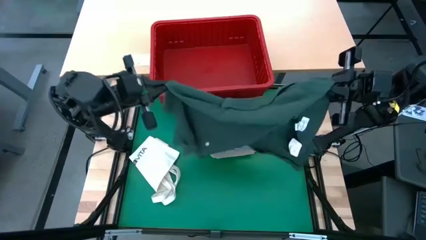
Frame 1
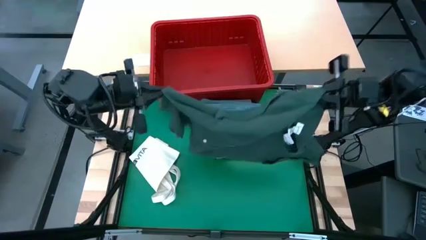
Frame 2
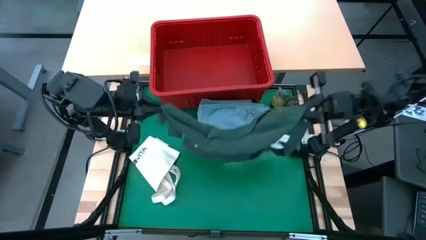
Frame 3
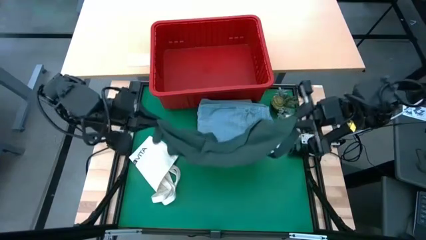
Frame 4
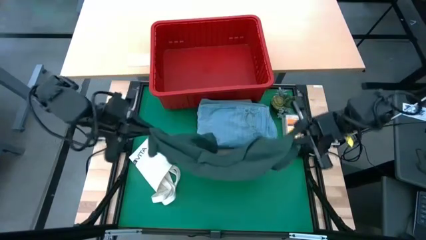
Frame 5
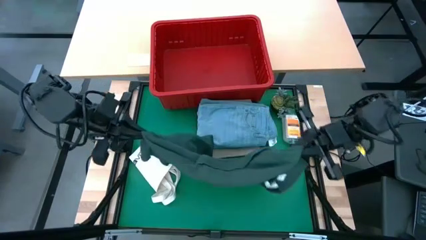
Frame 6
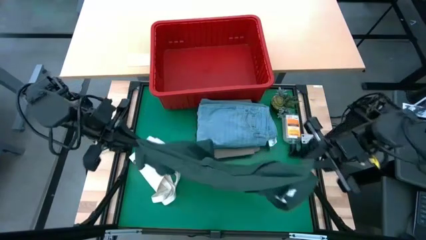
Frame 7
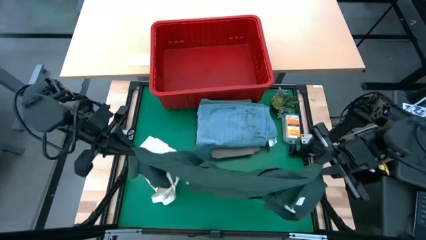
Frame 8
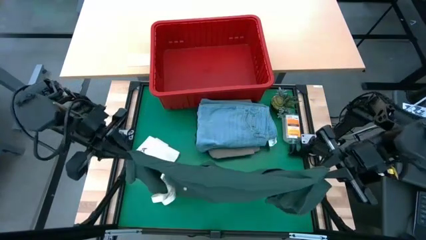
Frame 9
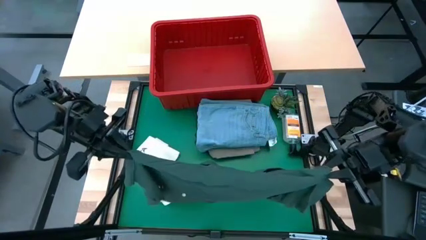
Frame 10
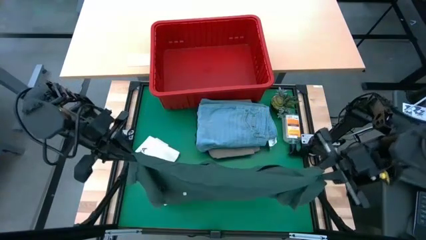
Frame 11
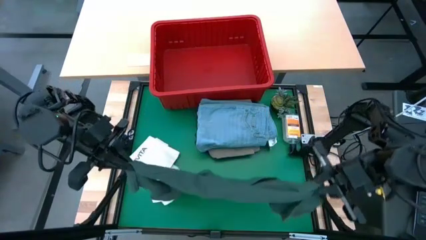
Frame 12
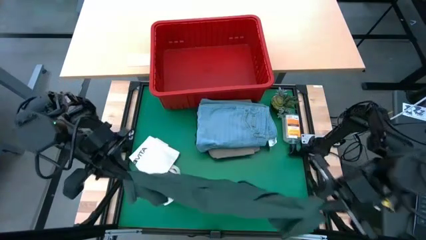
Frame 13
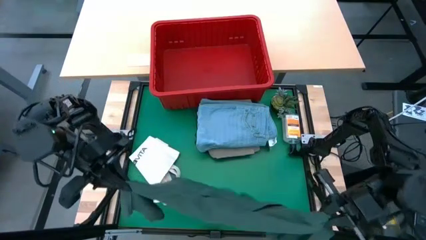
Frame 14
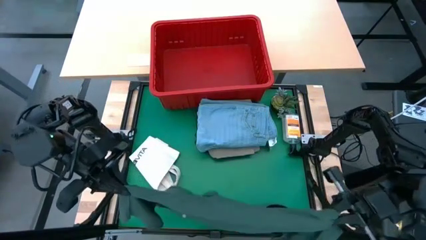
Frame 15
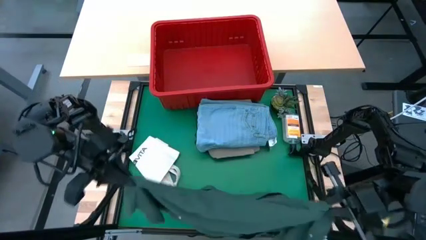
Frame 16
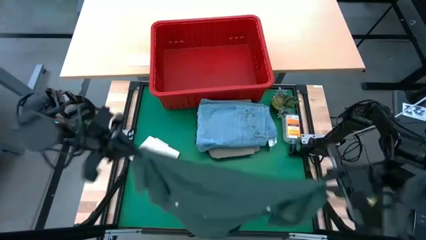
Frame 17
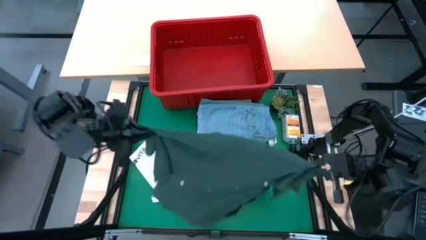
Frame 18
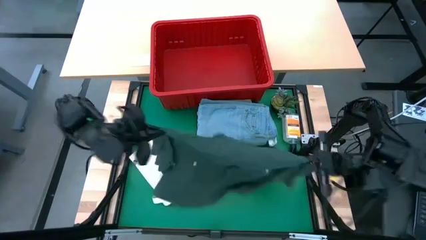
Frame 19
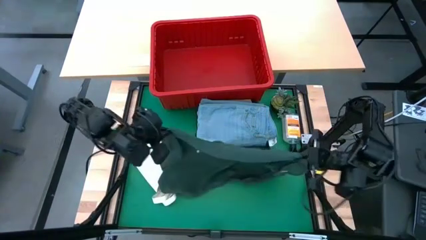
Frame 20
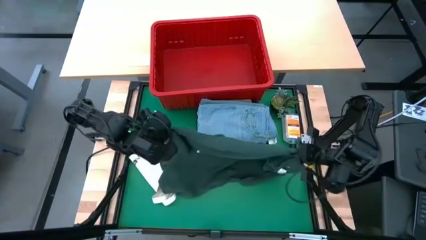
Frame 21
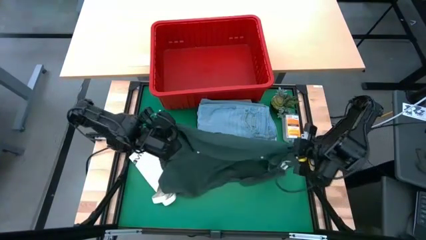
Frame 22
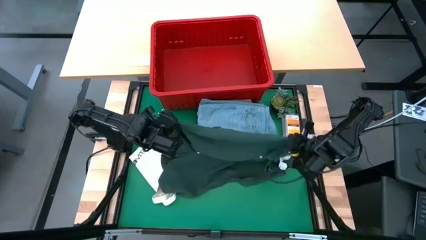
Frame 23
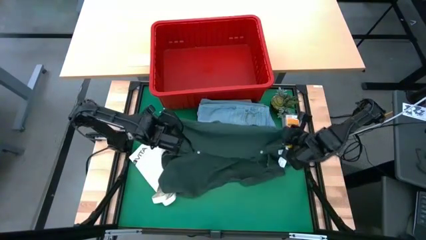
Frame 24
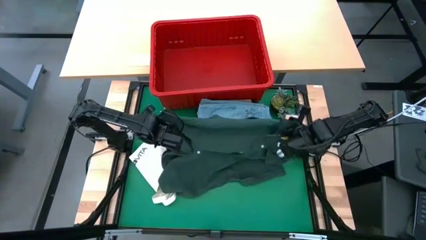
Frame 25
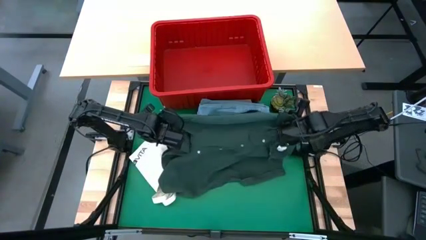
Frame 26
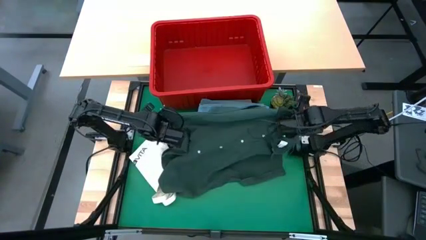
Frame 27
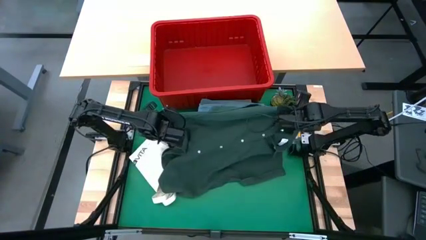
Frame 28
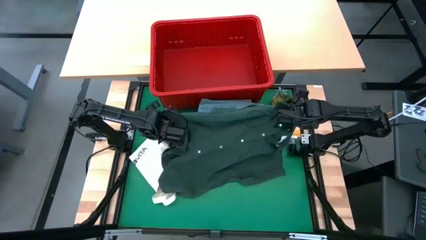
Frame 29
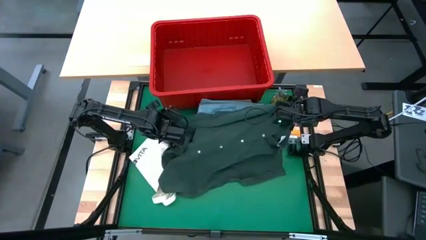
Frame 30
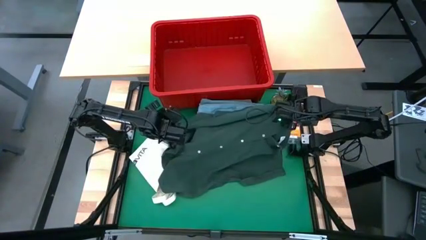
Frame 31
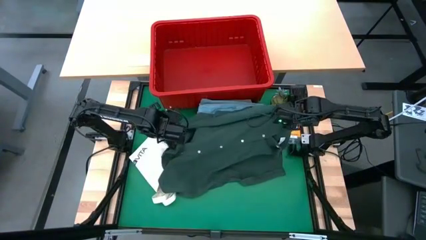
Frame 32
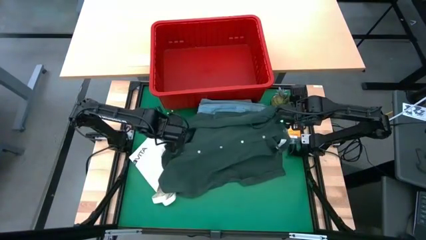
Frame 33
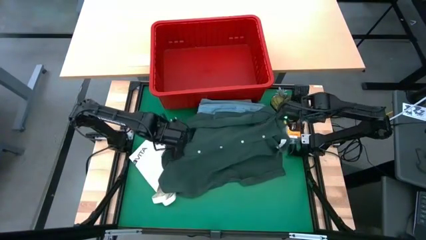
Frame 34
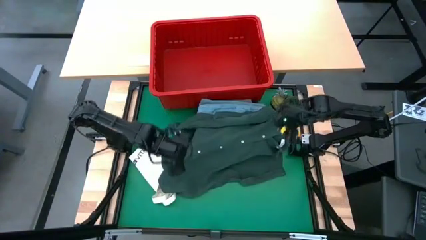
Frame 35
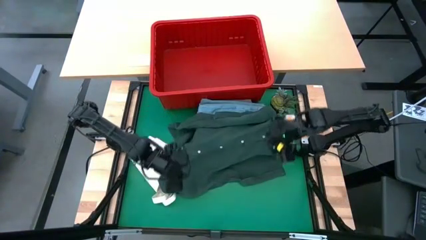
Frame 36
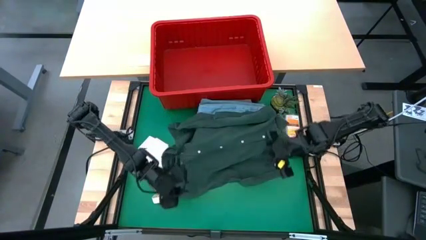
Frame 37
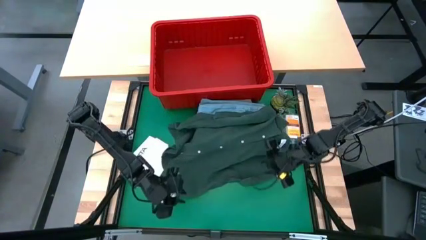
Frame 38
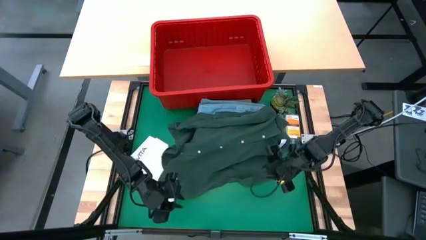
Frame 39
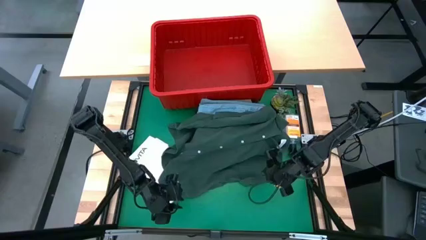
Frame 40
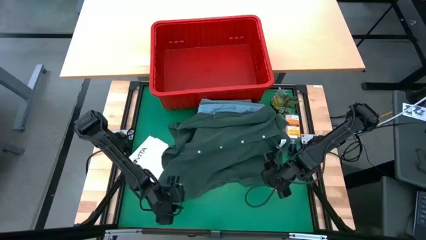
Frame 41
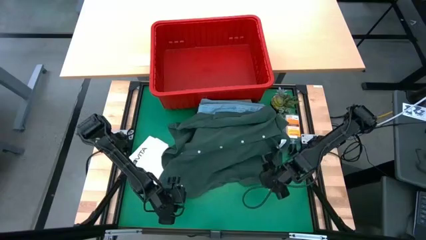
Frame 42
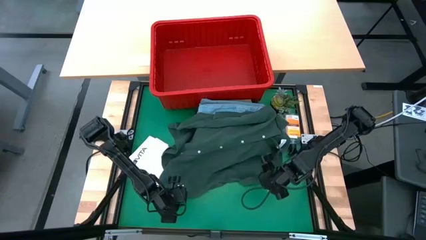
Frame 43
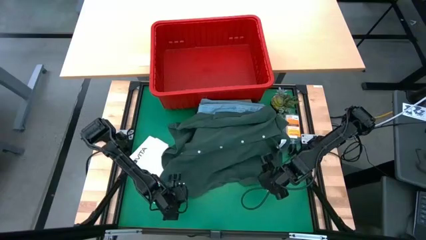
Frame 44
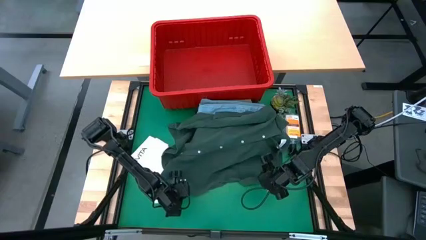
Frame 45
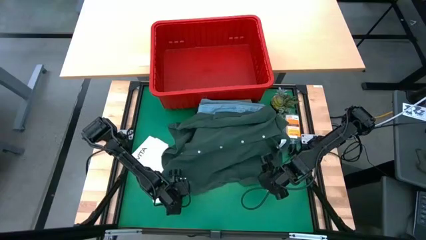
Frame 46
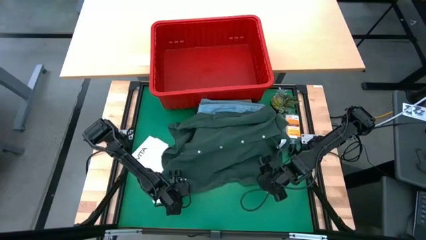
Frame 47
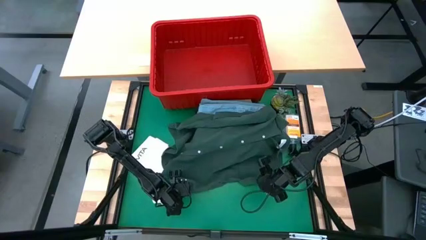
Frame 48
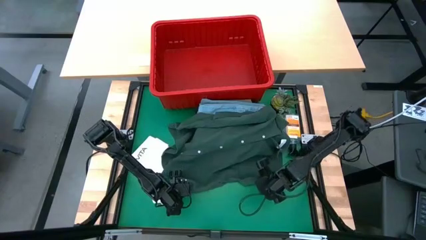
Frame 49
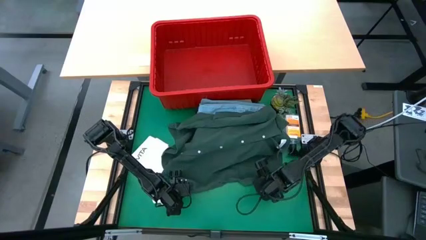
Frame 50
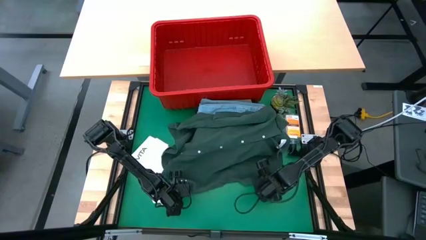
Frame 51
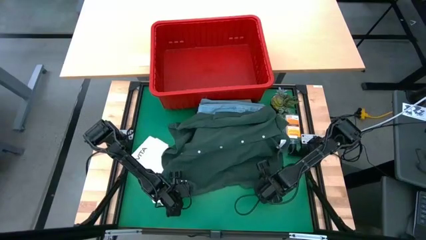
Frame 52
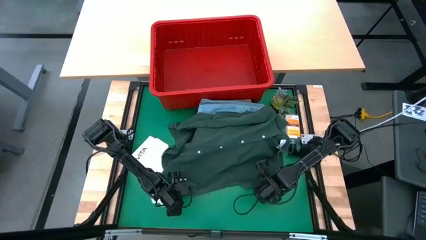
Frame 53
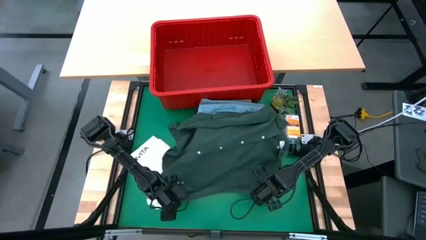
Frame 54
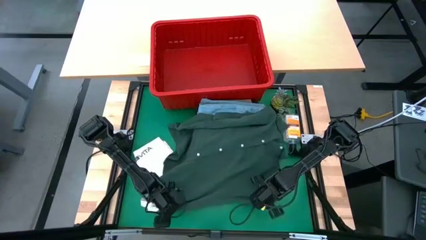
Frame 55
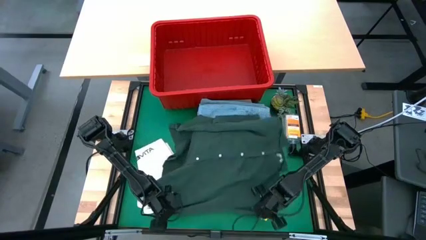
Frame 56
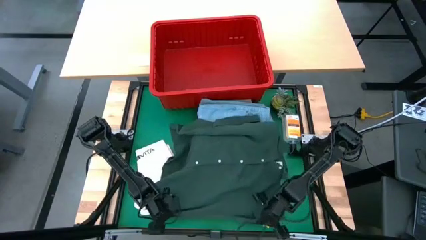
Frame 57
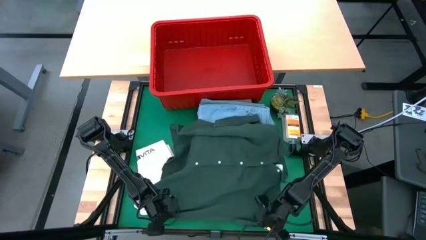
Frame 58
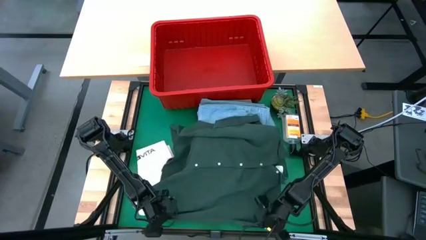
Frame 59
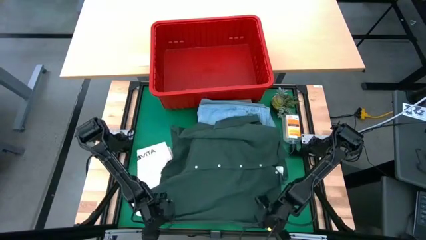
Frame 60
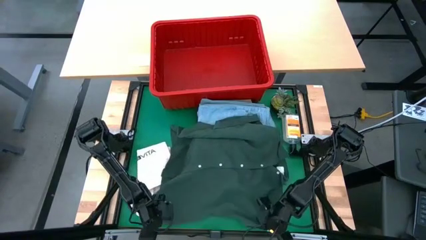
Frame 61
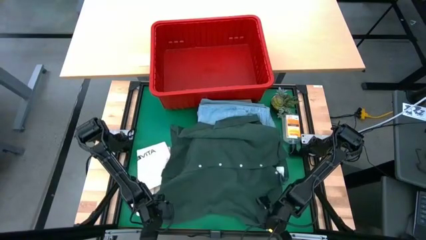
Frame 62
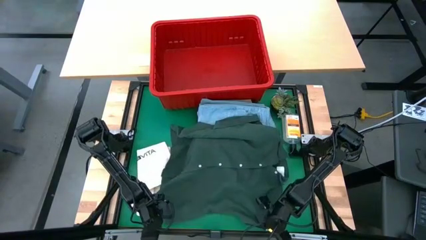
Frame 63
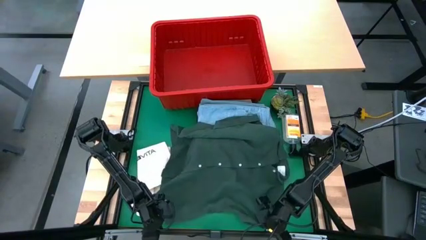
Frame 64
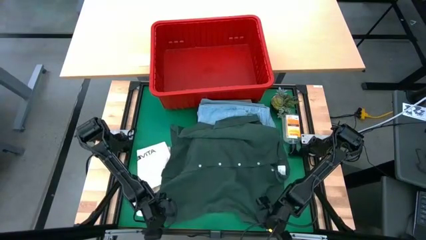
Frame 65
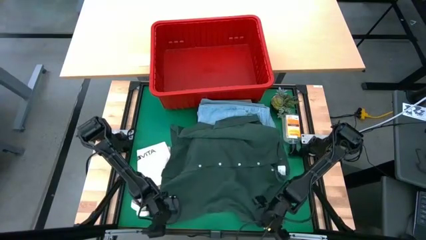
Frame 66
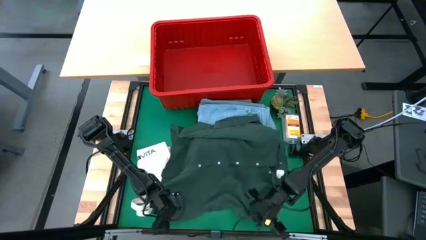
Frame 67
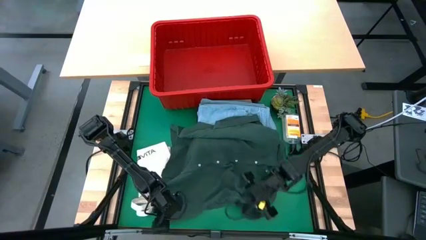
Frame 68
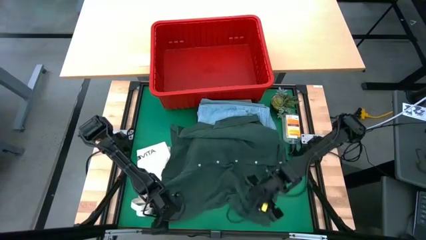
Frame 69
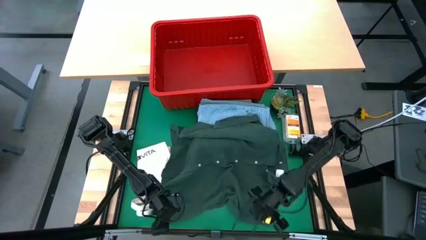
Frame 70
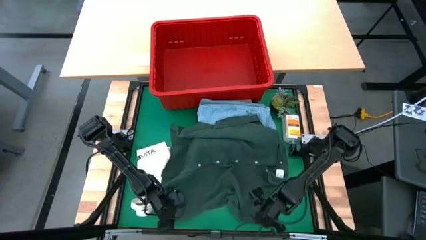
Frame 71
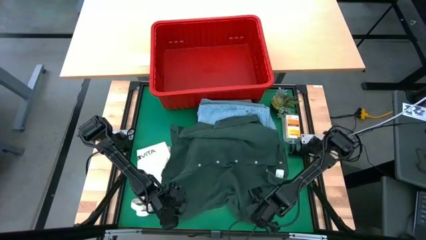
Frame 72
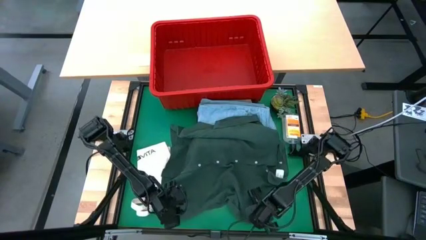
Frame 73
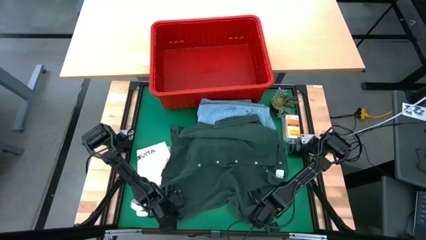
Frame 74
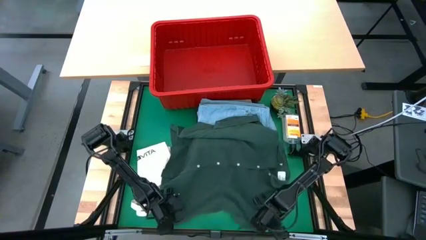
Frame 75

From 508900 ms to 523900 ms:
Task: Fold laundry
Fold the green polo shirt

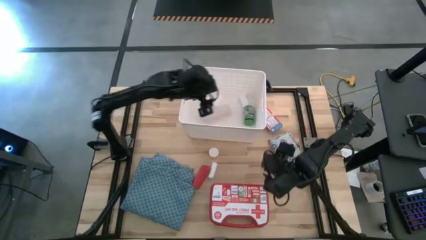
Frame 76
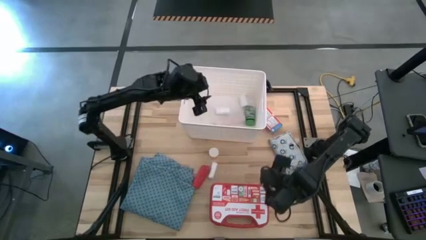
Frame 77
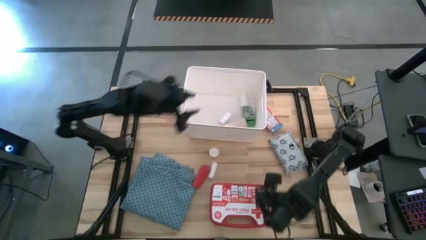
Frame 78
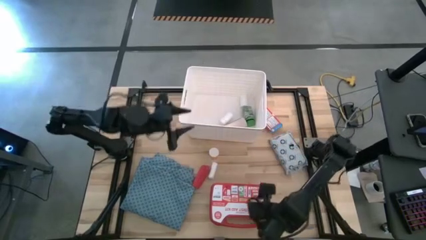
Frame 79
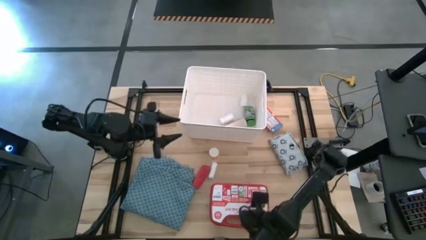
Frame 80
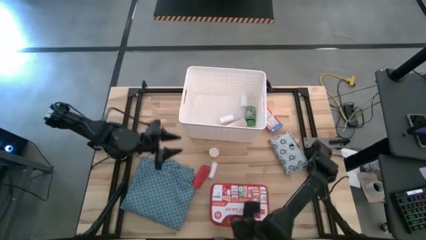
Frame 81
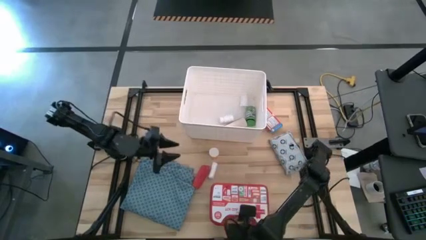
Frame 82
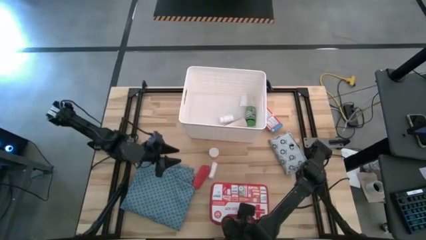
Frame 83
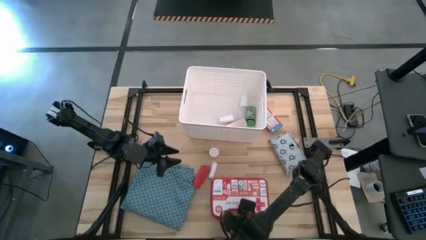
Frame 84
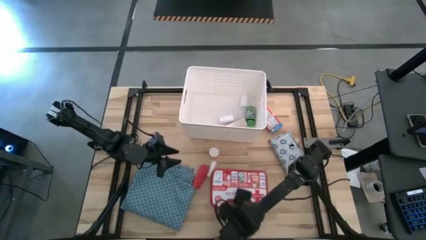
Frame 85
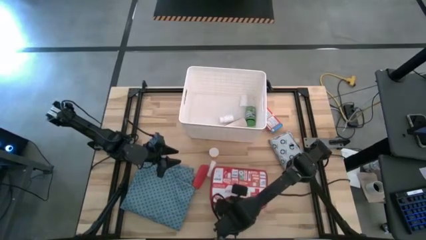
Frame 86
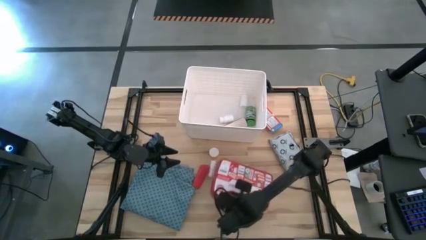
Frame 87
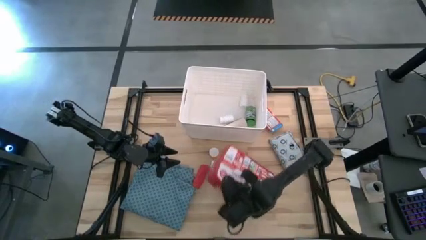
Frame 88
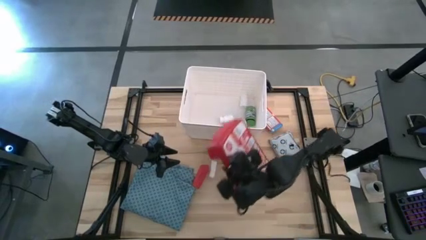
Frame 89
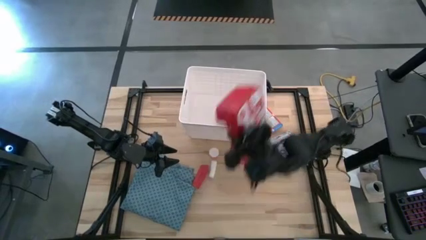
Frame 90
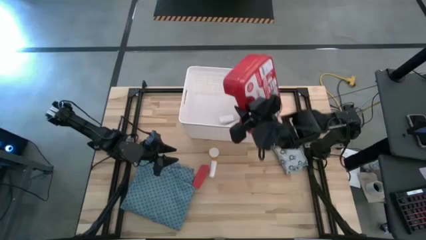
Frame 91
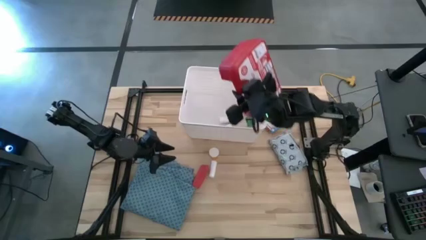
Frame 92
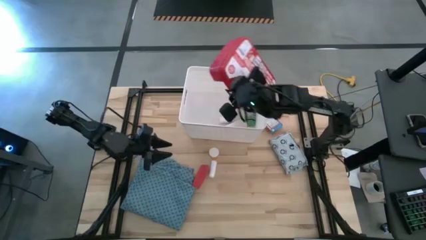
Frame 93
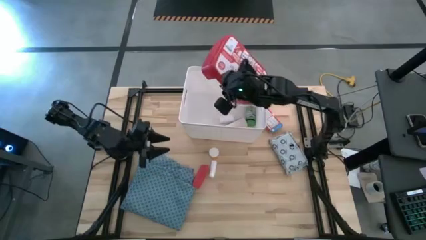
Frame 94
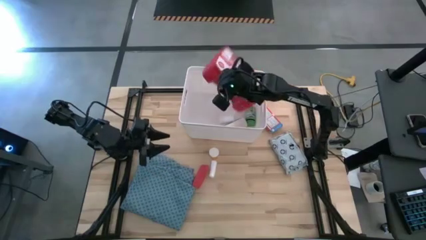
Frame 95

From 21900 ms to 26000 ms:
Task: Pick & place medical supplies in basket/bin
Put the red first aid kit into the white bin
